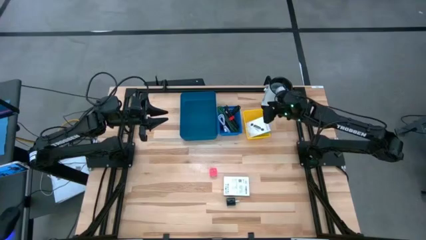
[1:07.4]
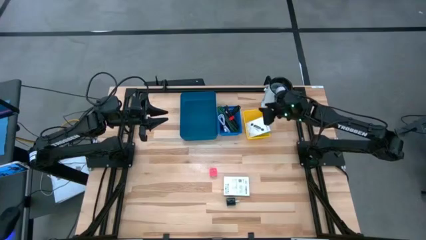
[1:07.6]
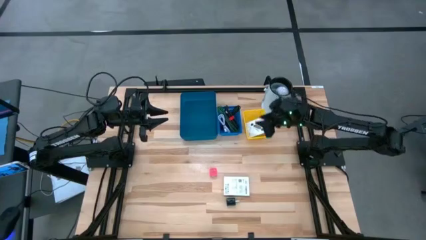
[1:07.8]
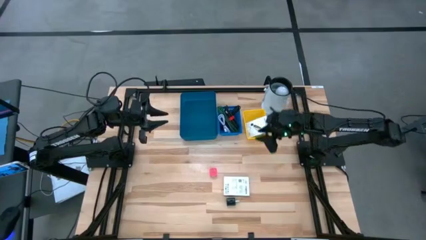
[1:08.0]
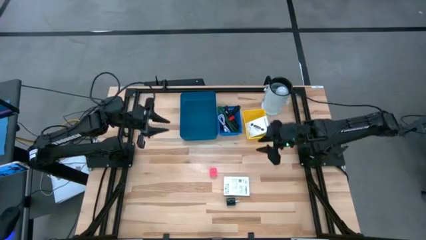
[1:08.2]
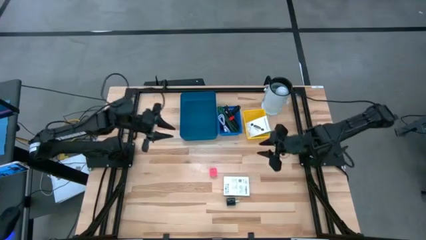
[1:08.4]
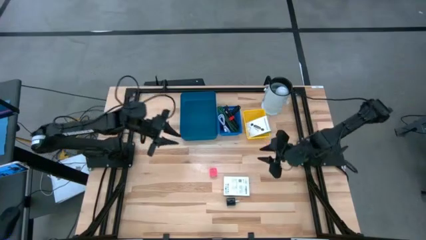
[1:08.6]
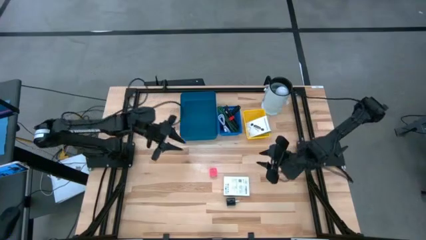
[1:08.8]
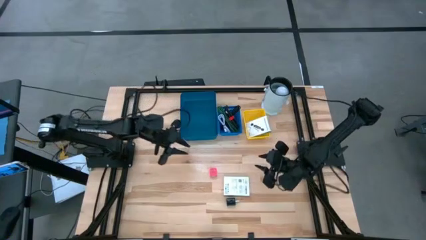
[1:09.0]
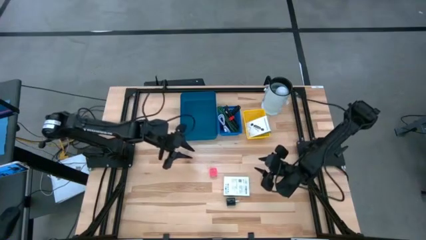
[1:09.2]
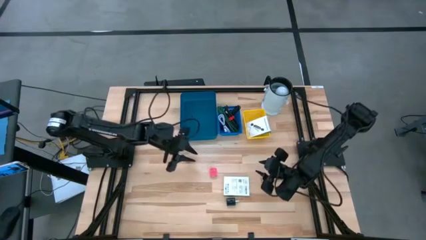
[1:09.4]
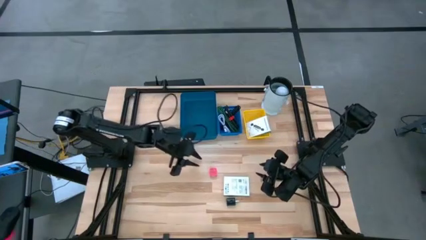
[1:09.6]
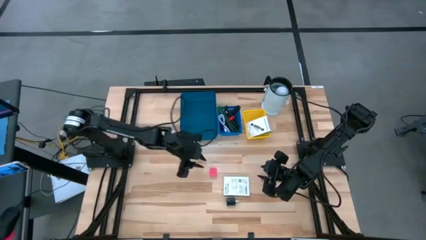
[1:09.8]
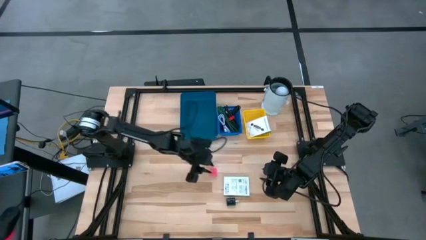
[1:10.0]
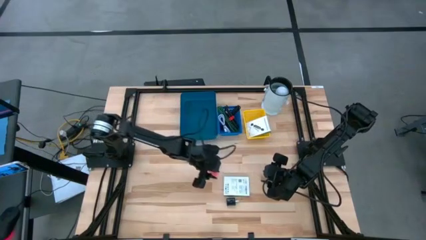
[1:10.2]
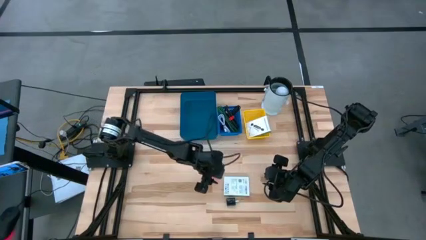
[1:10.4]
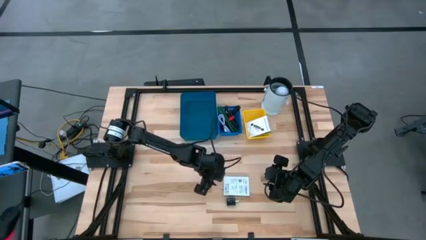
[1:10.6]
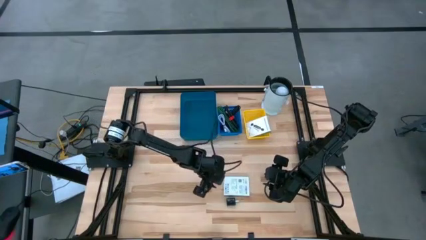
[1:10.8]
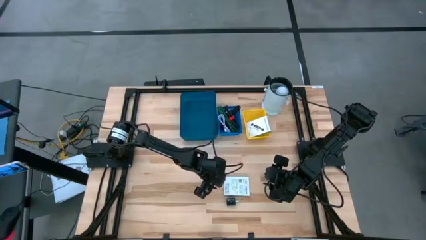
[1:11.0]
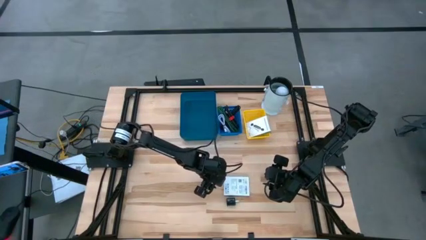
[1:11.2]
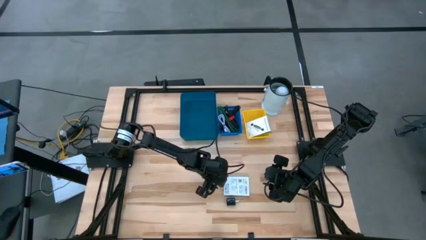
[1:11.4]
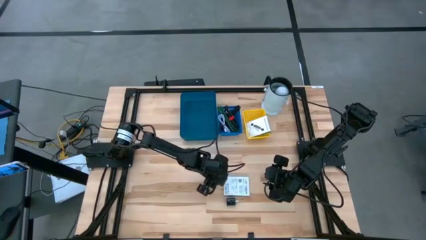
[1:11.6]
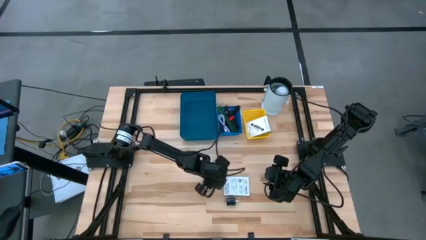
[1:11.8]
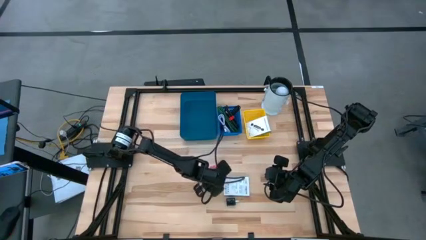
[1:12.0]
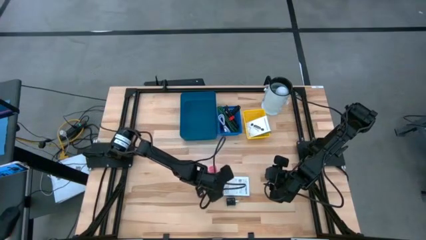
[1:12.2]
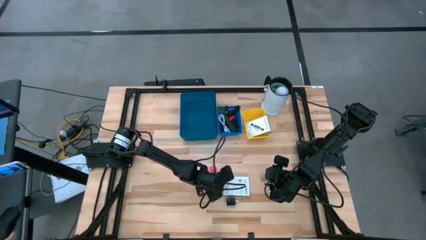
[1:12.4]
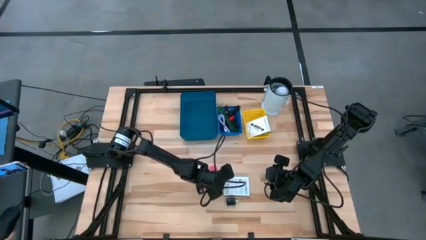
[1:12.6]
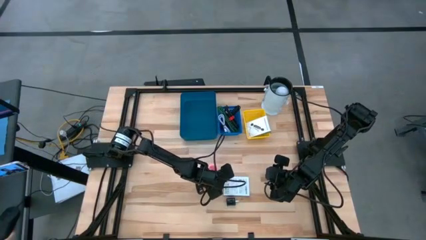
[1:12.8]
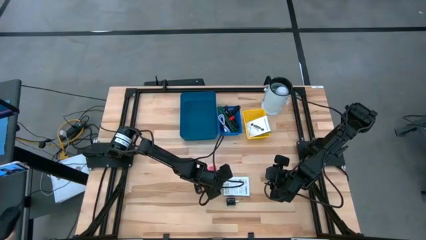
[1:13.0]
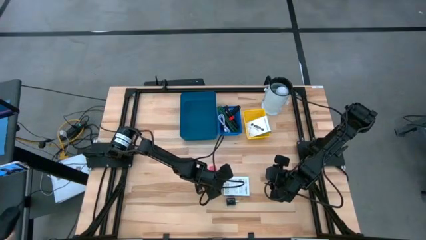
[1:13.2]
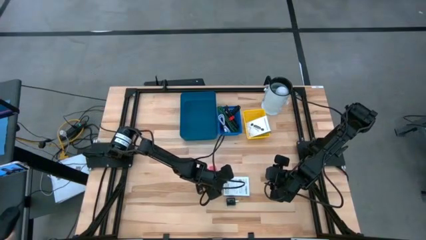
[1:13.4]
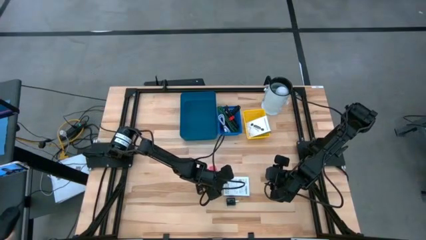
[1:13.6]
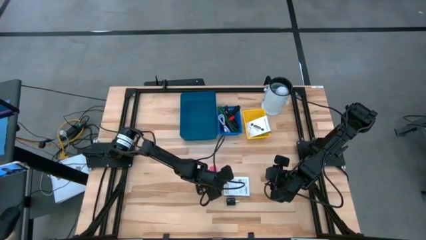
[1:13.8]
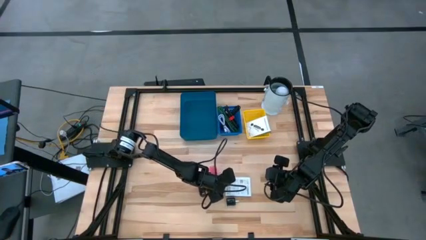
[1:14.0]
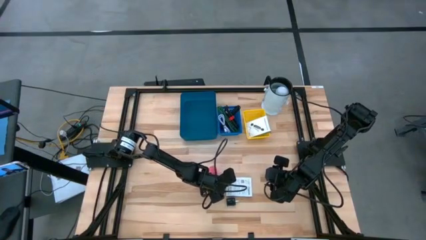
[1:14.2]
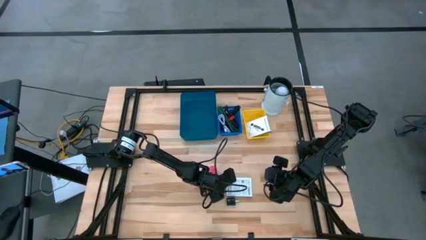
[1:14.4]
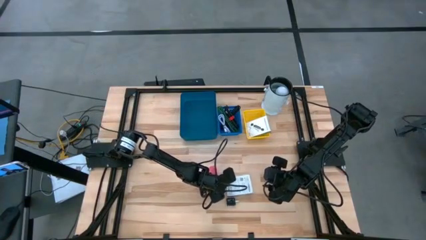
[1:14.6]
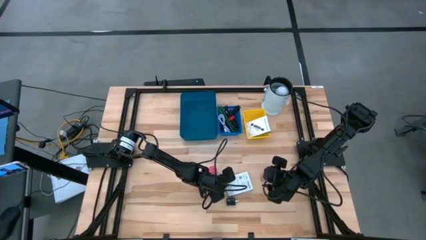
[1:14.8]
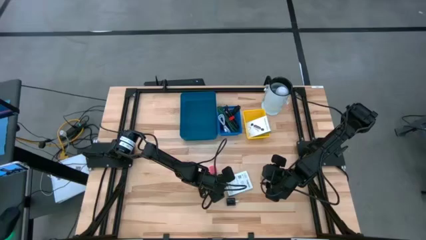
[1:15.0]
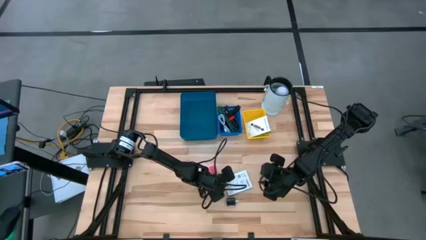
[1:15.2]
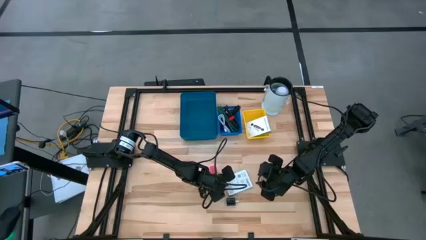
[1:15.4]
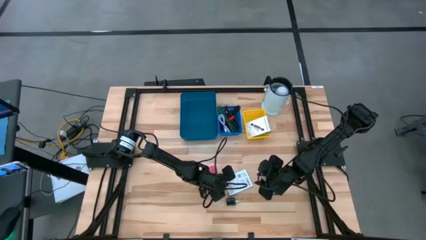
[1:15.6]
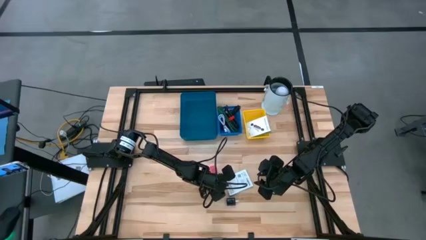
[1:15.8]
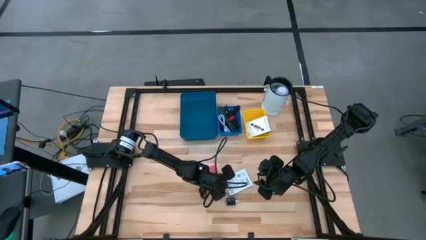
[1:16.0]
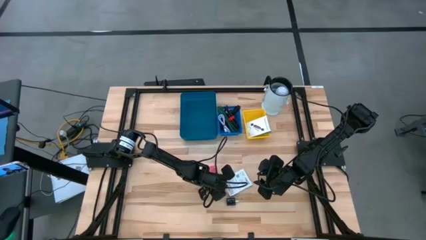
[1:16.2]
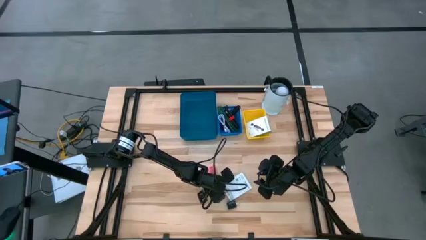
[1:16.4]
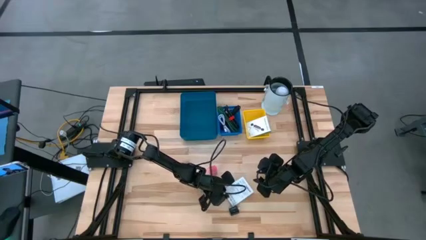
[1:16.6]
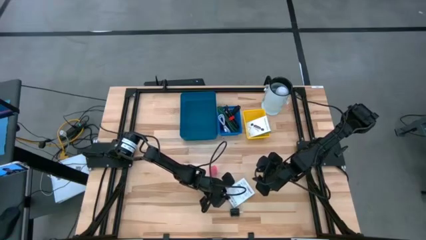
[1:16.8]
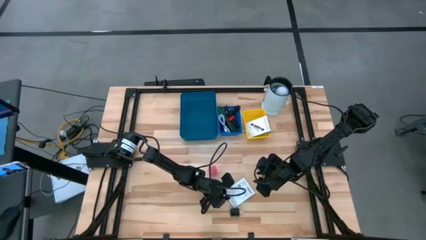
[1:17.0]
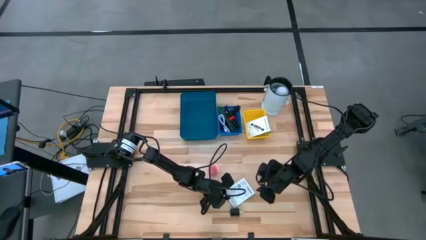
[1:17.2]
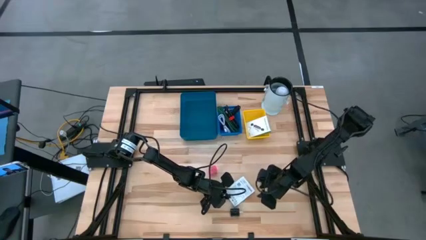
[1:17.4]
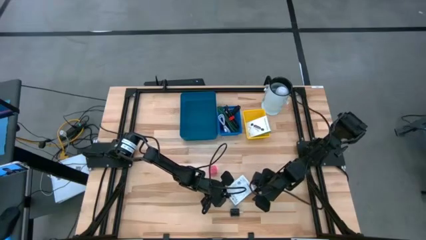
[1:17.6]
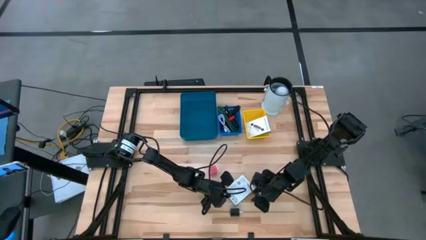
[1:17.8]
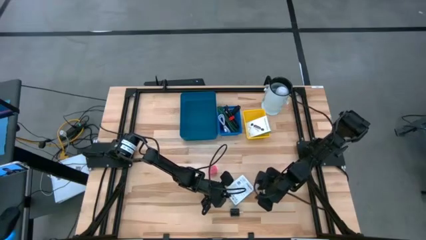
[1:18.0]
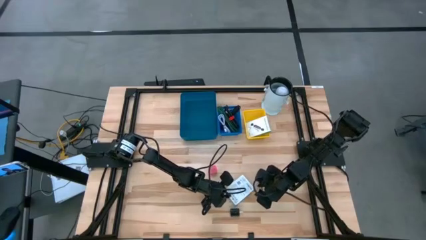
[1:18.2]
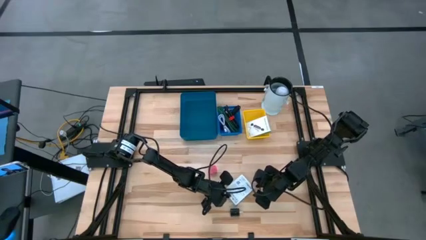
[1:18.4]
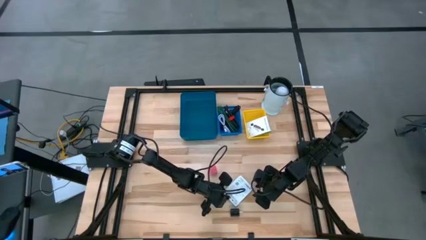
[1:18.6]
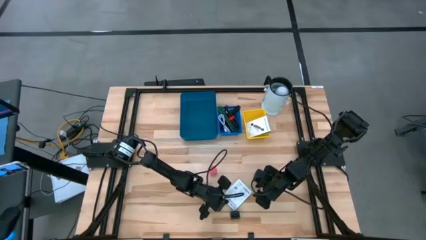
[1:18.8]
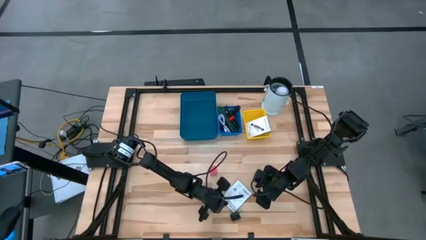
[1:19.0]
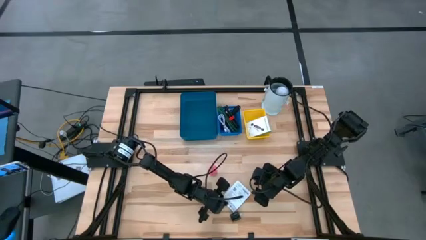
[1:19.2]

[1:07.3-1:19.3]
Task: Pick and place items into bin
Put the card reader box into the yellow basket

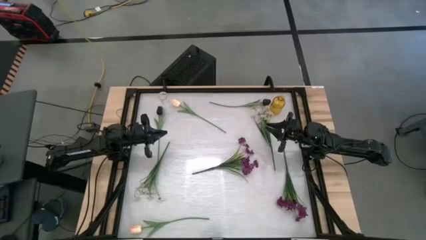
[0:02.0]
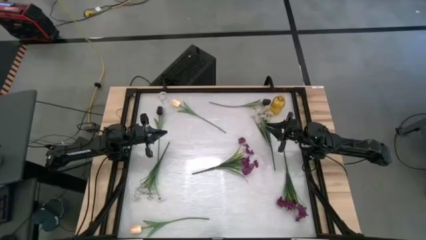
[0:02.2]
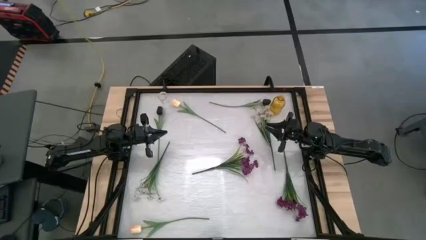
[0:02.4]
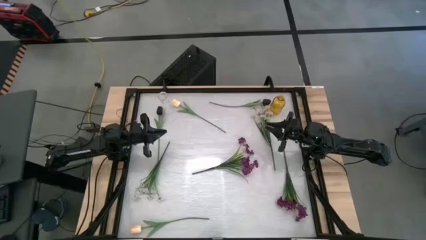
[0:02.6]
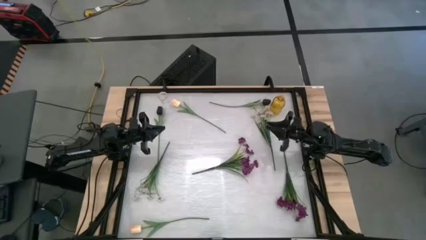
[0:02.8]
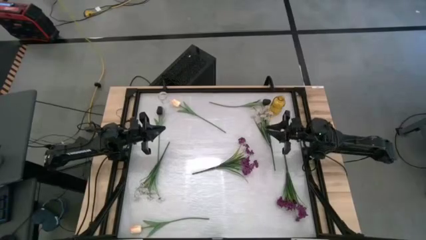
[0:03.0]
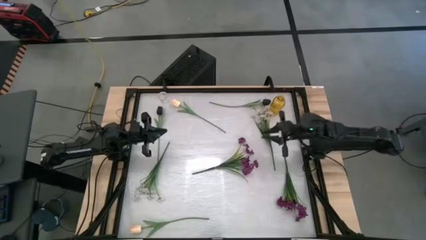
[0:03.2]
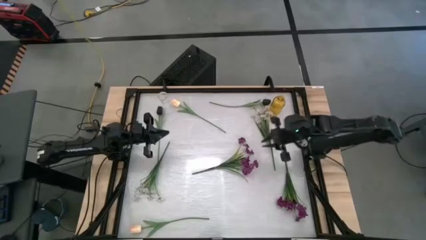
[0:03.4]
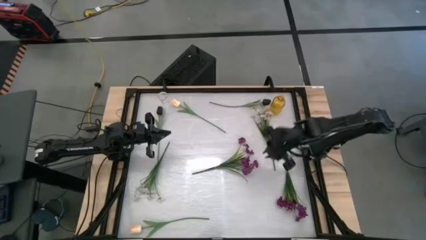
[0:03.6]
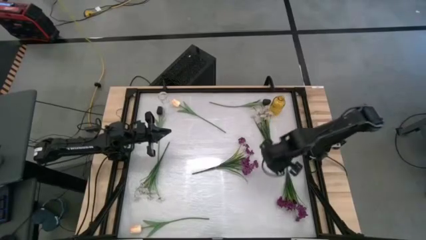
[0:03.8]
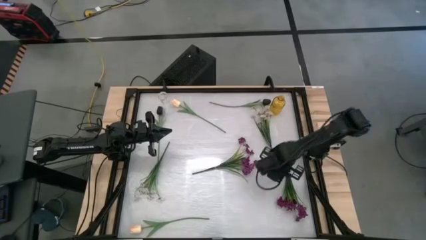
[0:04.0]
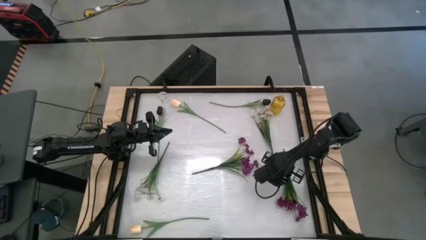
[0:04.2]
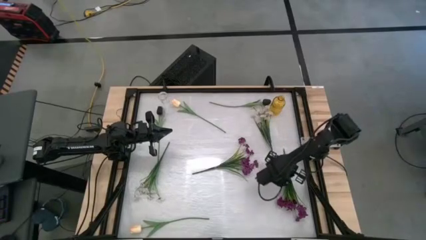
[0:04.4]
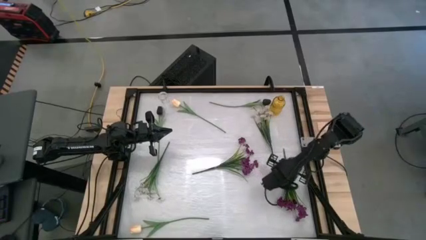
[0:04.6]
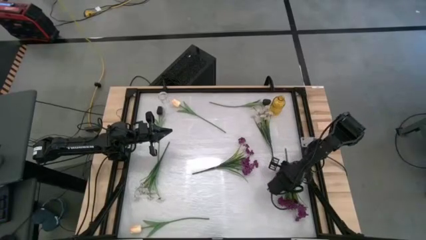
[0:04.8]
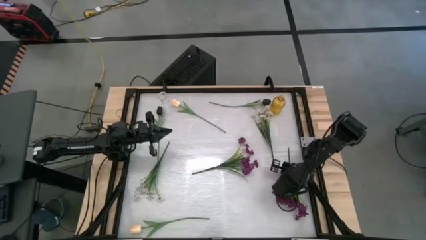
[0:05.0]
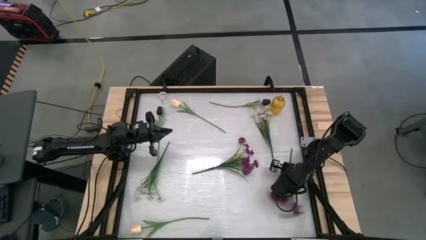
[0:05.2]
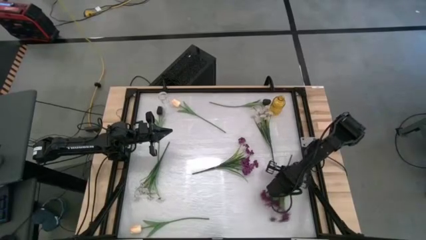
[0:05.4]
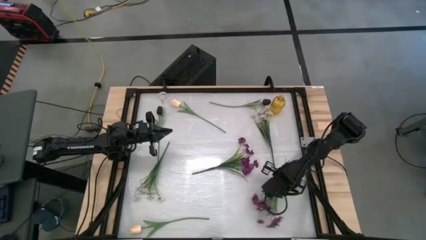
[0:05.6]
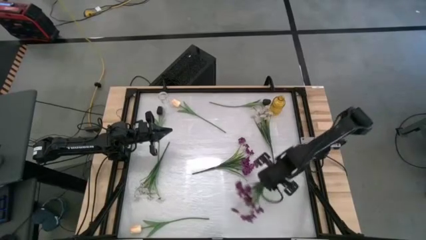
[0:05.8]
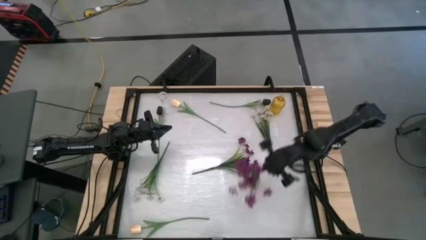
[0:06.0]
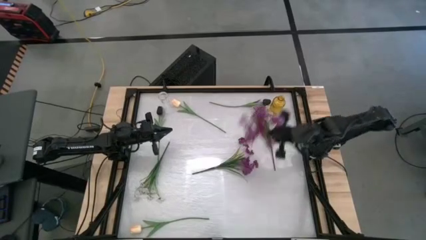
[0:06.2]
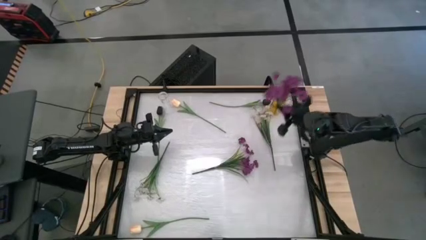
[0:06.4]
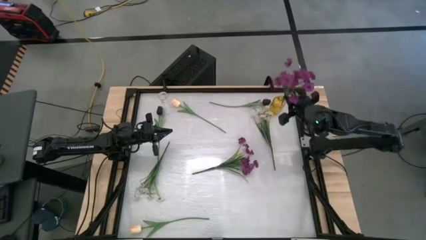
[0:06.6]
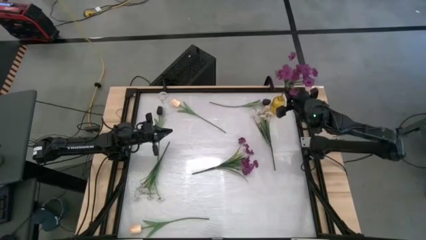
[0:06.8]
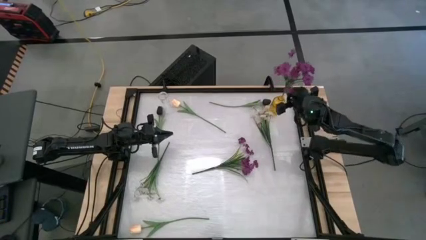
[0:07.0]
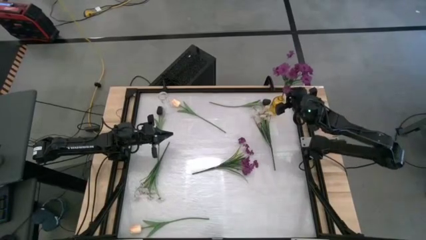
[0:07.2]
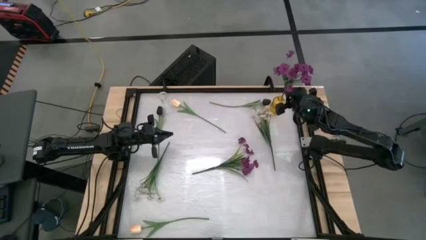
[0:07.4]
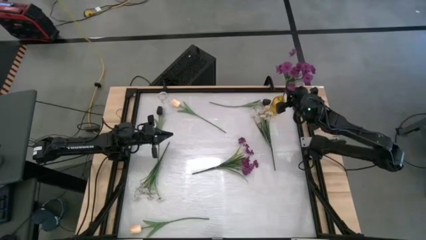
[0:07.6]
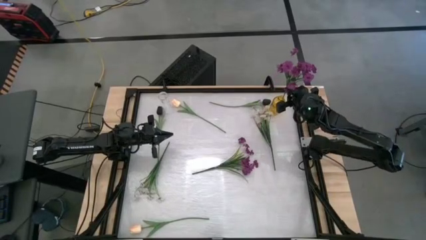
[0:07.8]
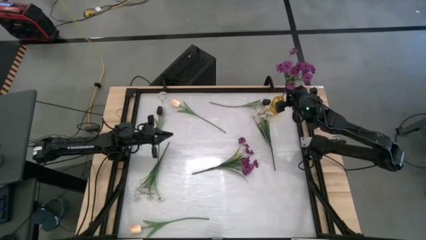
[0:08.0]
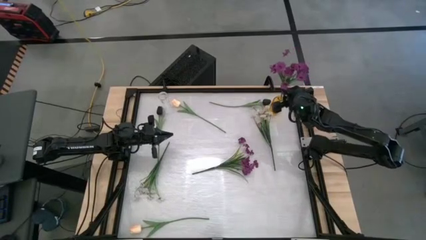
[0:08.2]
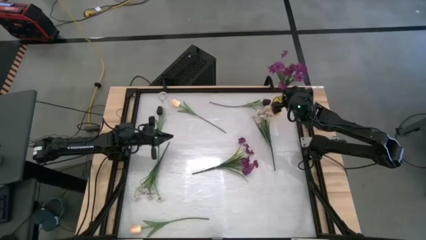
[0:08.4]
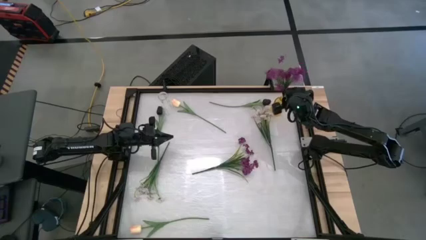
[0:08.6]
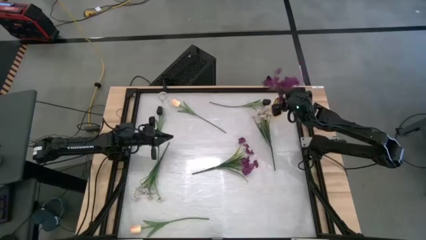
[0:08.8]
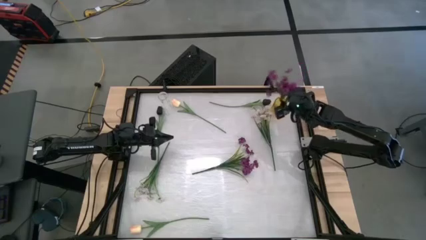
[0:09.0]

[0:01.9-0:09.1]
Task: Sort flowers into vase by color
Put the left violet flower into the yellow vase
